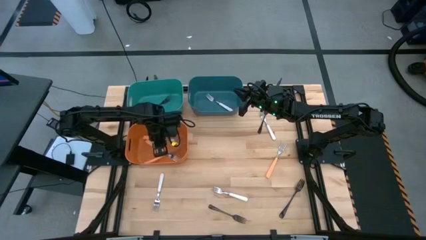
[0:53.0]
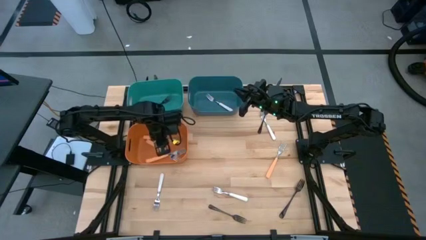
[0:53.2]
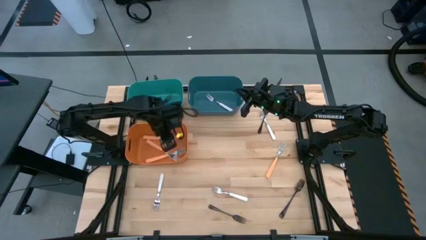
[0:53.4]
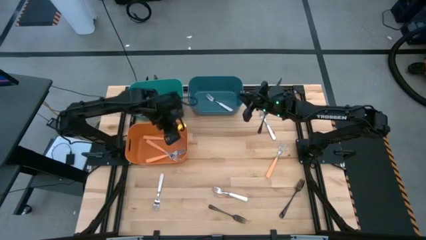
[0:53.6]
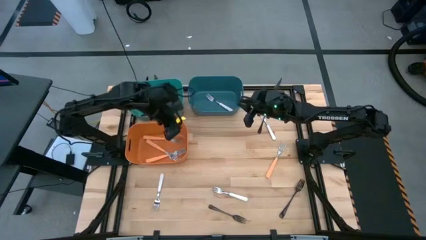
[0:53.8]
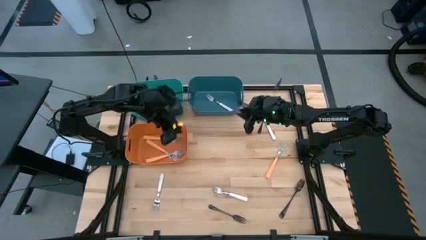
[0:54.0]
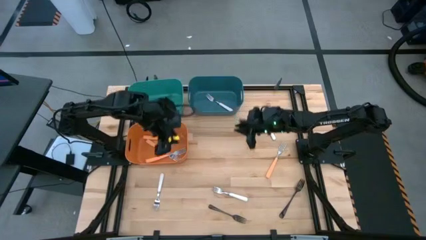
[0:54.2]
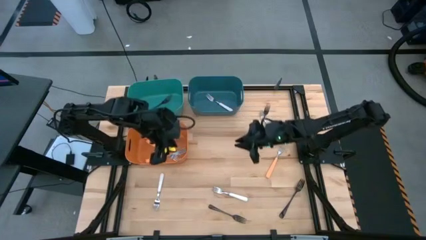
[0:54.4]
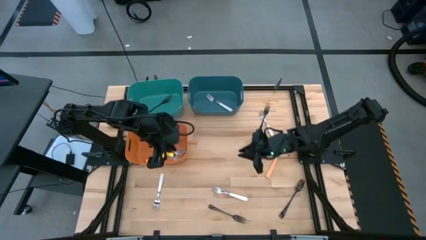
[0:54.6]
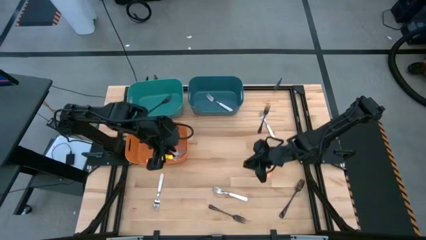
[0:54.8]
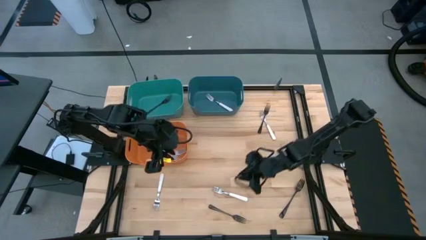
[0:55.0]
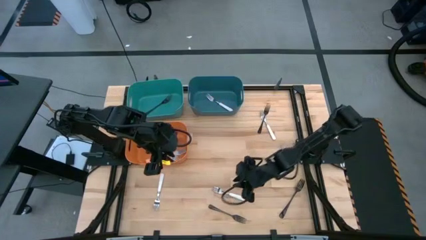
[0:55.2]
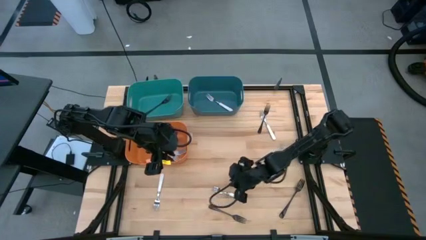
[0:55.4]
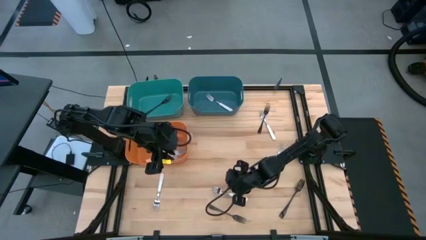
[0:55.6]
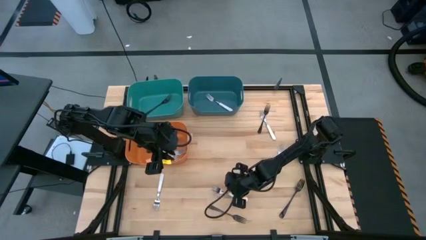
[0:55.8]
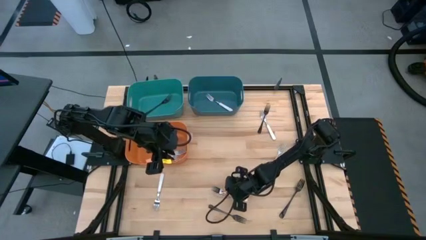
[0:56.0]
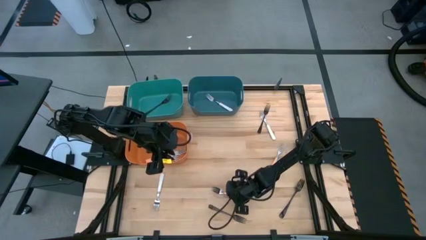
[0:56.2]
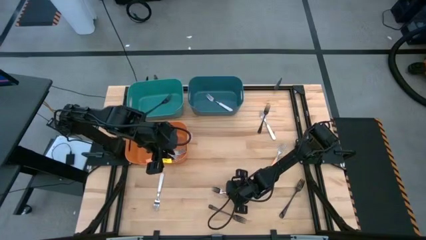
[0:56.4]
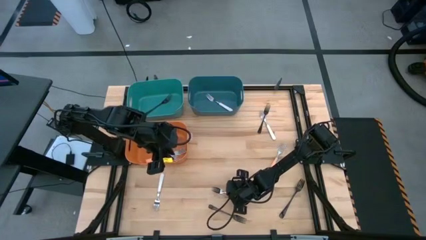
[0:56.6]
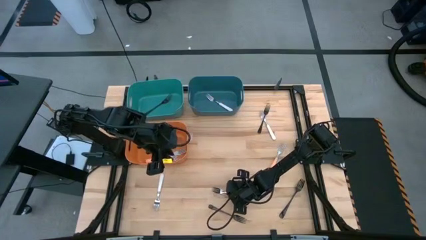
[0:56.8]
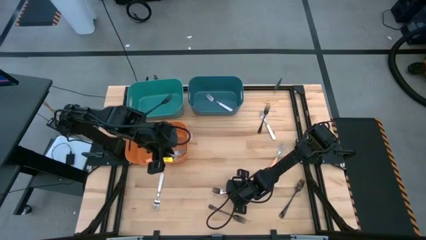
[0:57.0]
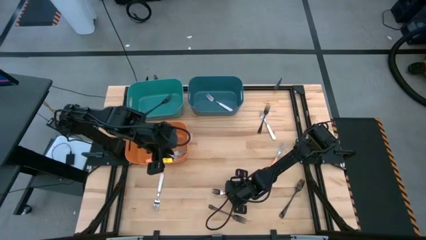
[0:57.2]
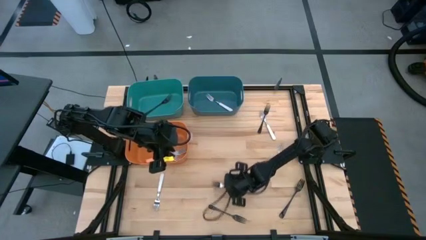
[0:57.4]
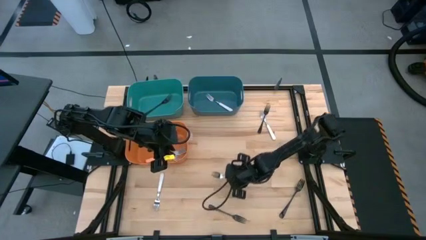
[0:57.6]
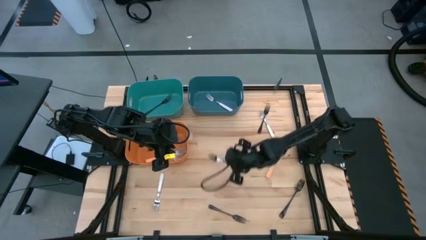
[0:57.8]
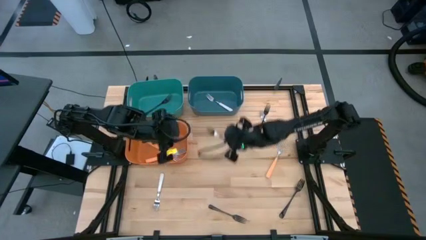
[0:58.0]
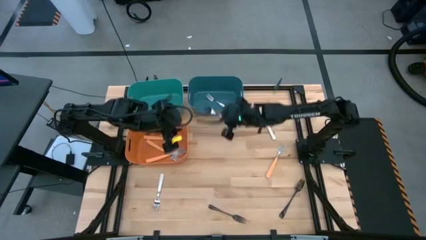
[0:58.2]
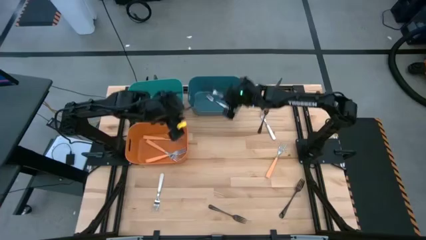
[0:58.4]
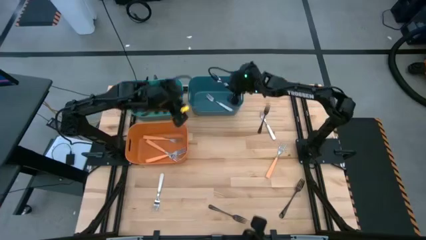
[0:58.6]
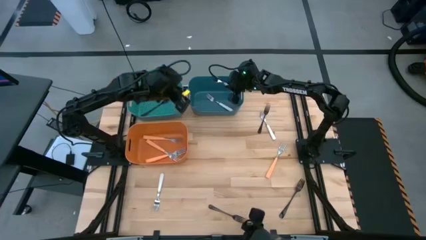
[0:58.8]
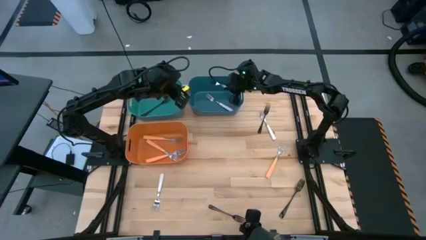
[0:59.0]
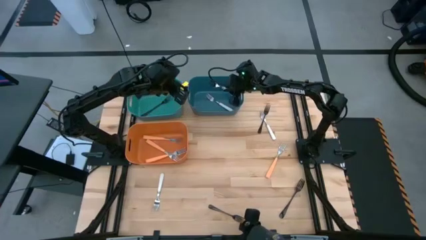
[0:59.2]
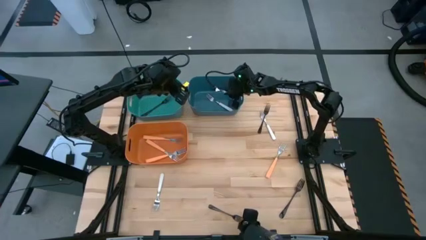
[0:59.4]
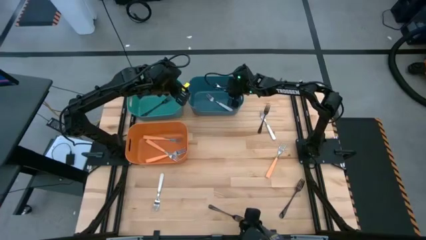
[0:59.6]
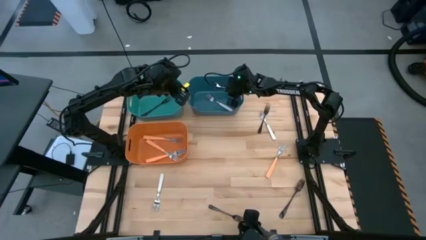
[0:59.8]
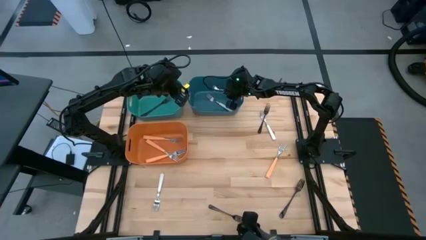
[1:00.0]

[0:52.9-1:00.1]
Task: Sort silverware by color (type)
Put the white fork into the blue bin

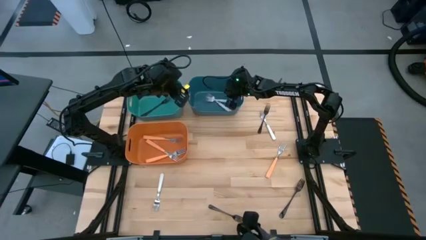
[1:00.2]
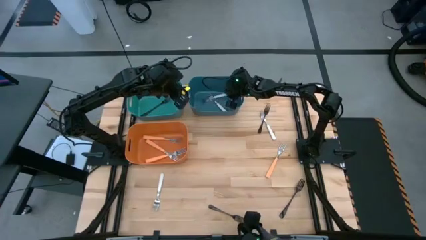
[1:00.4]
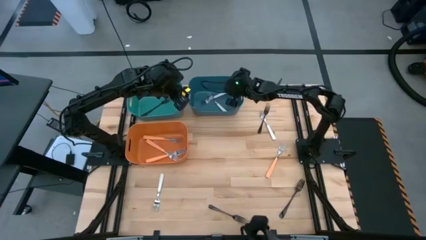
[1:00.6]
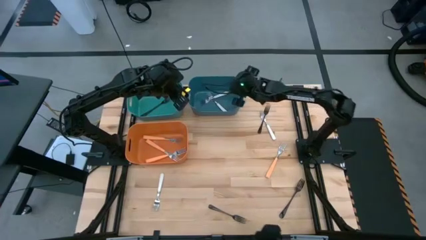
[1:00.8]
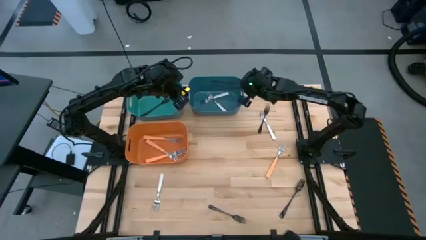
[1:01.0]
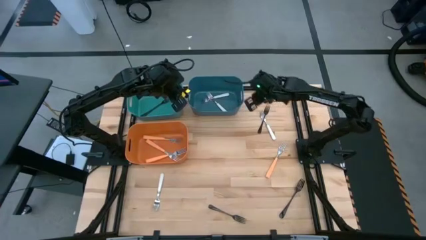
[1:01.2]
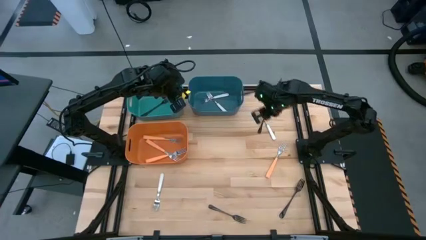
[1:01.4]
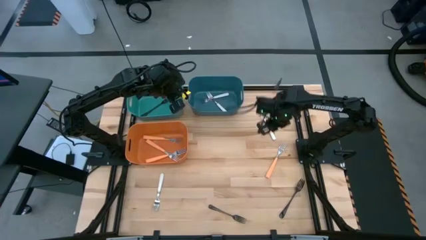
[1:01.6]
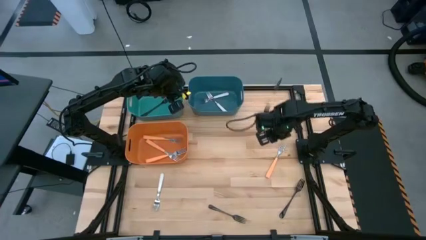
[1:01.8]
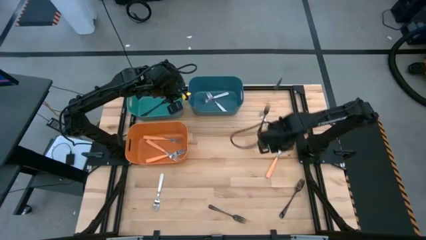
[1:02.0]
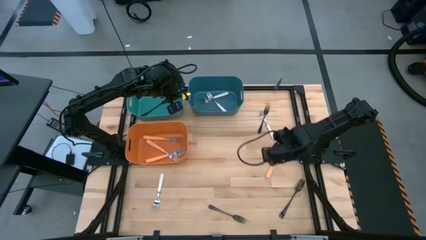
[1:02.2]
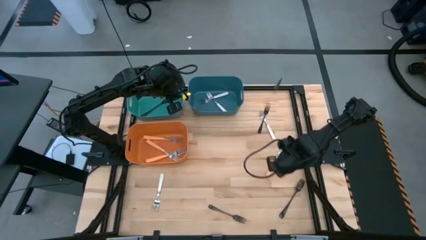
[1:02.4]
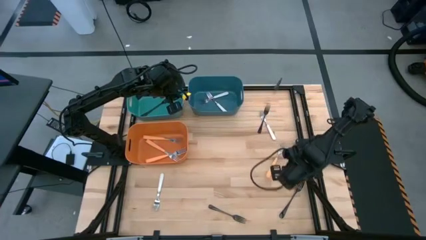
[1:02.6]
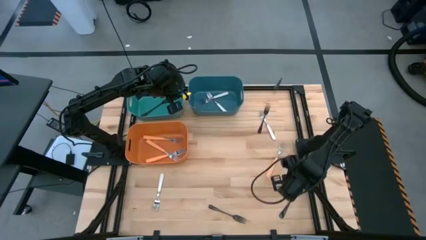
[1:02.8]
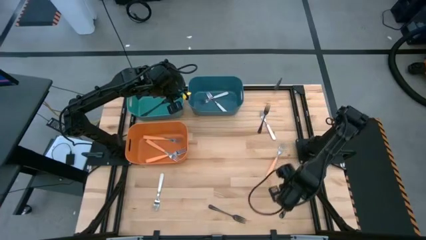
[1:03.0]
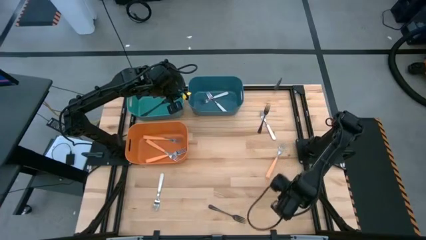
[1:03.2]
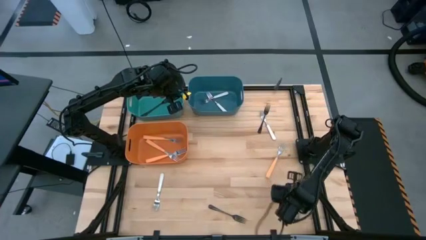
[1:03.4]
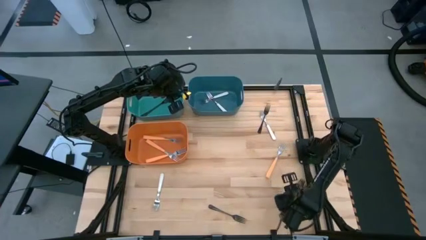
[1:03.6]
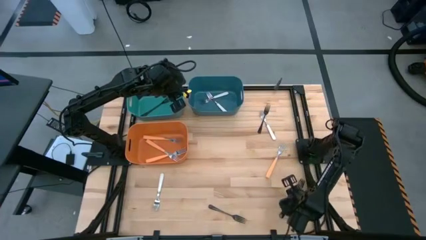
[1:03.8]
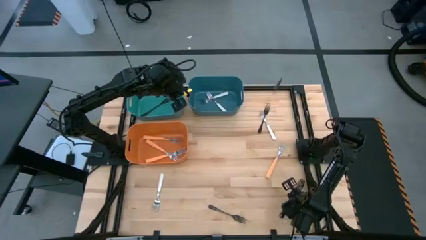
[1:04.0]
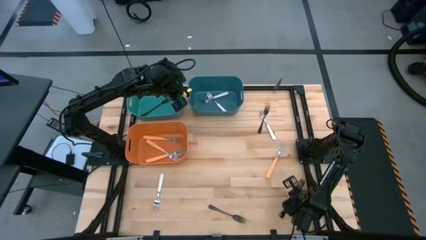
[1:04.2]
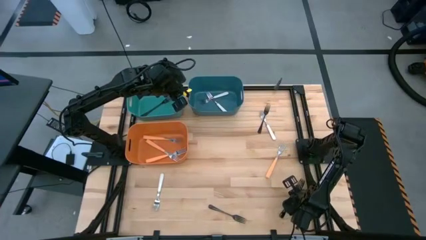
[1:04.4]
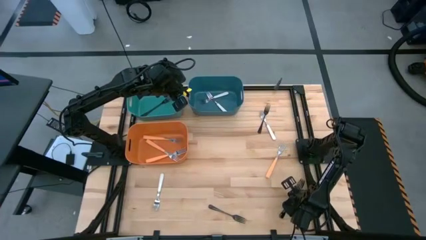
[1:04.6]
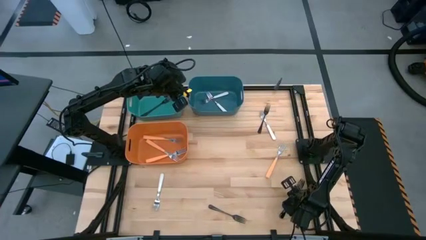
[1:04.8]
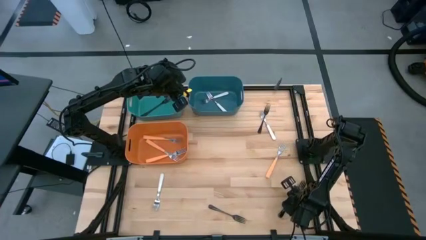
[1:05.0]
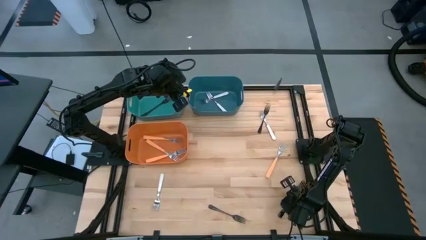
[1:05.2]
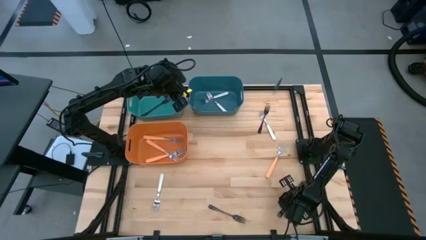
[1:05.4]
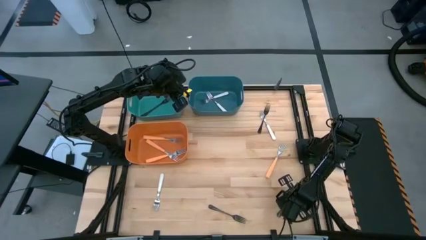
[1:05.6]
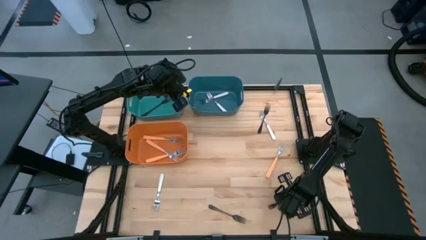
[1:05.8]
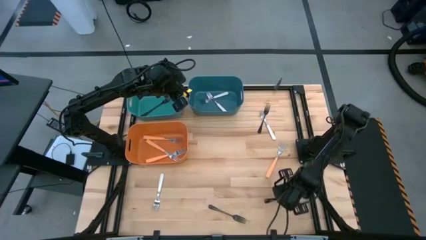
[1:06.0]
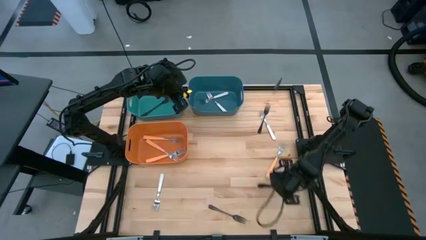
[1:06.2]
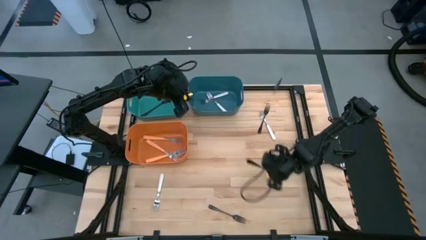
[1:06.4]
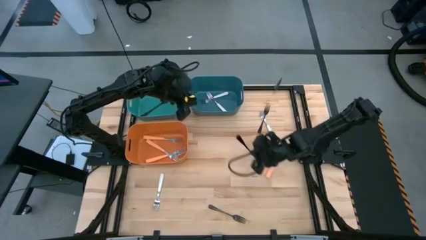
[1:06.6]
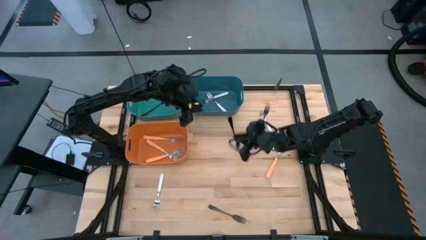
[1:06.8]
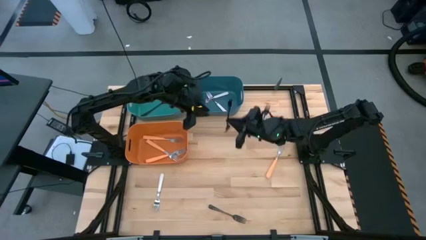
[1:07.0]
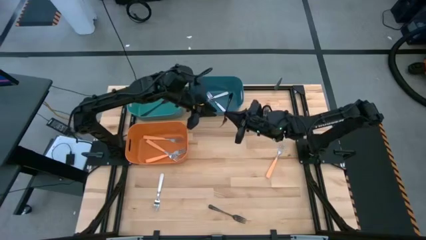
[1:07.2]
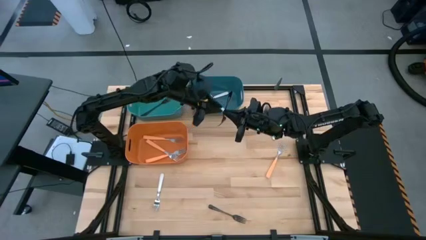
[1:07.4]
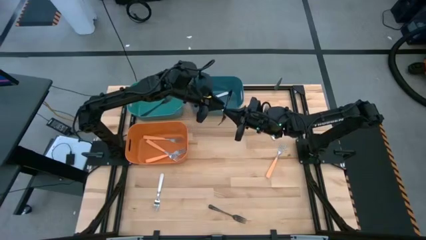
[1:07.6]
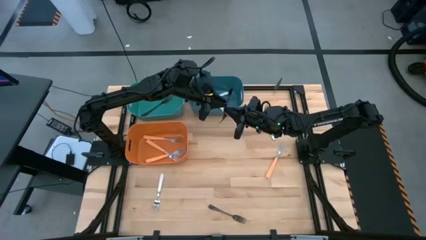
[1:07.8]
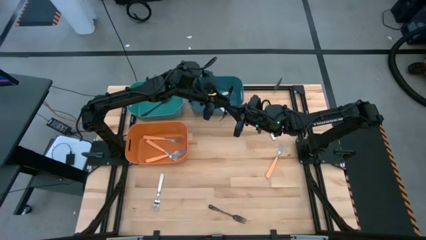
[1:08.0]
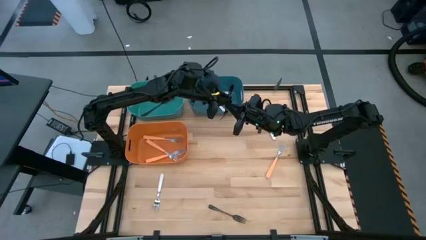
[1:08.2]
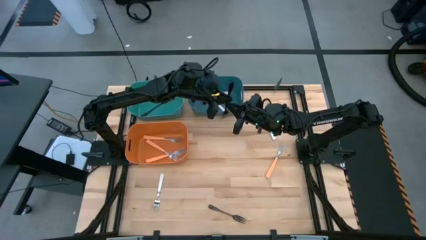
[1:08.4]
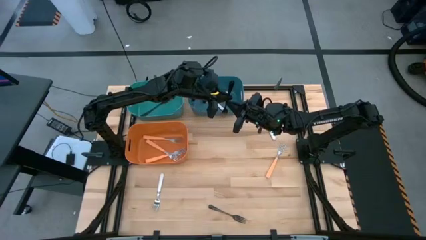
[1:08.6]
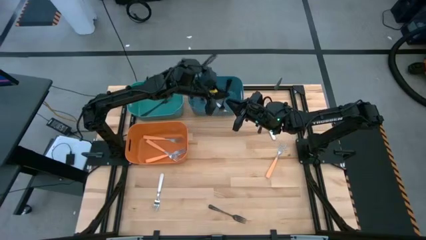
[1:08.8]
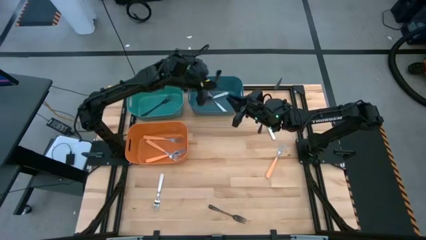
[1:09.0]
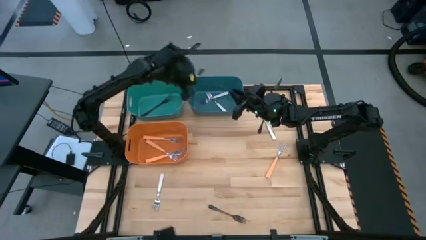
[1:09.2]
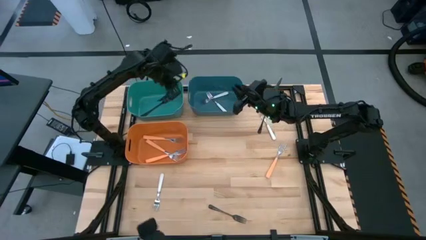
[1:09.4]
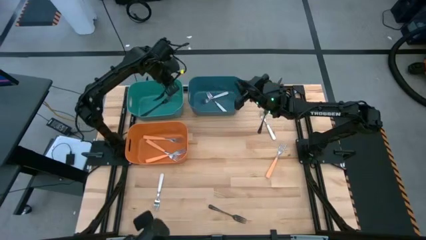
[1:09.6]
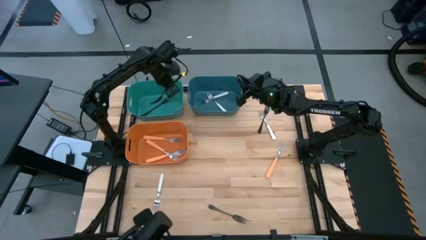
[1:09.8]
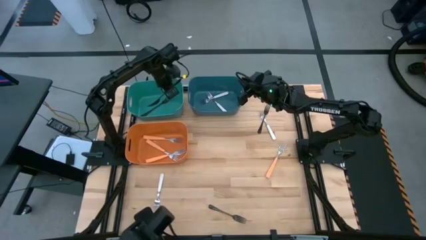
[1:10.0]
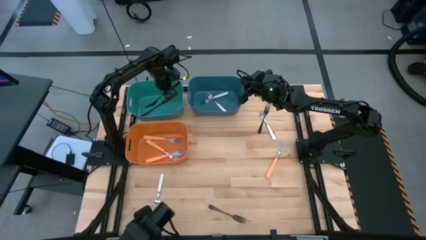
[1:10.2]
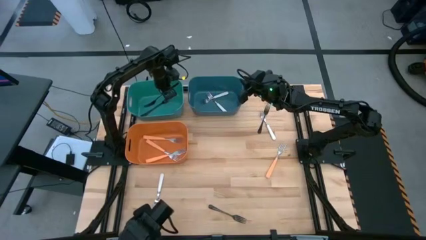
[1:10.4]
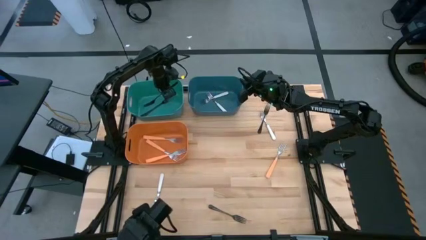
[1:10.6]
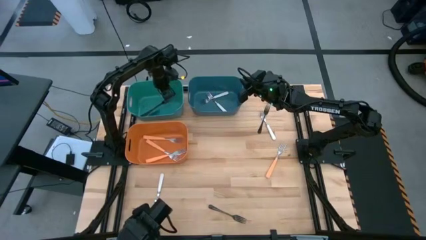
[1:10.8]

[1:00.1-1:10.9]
Put the black fork into the green bin
